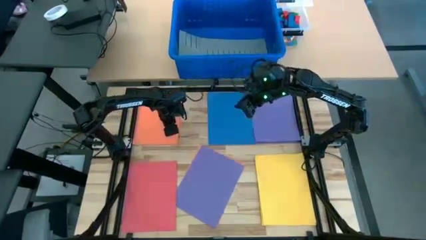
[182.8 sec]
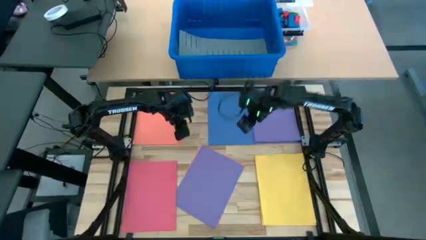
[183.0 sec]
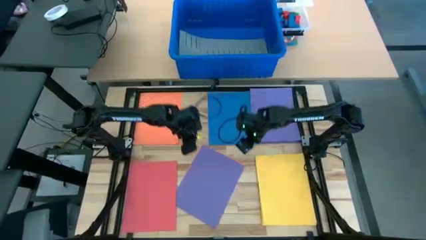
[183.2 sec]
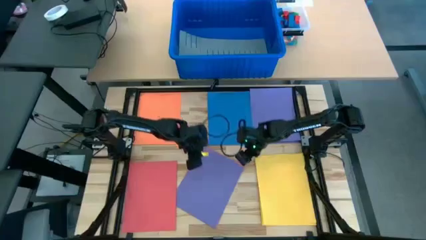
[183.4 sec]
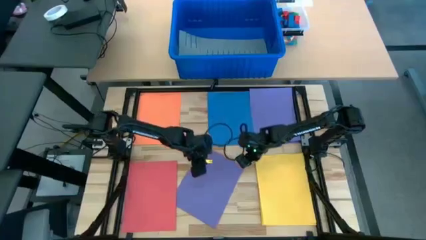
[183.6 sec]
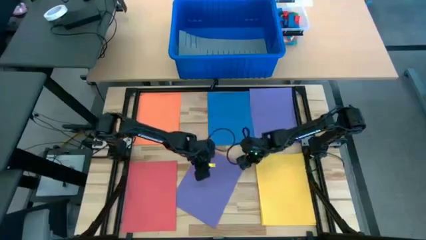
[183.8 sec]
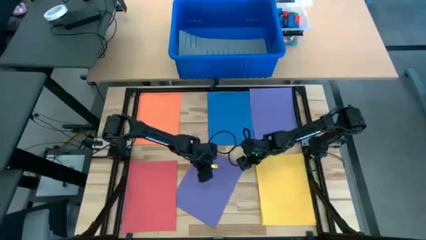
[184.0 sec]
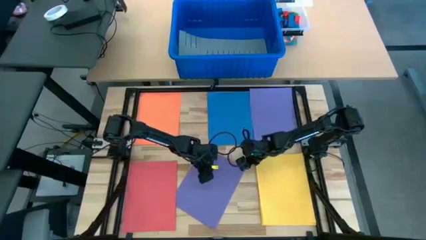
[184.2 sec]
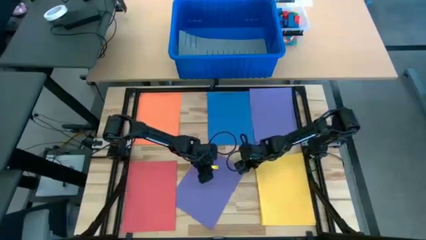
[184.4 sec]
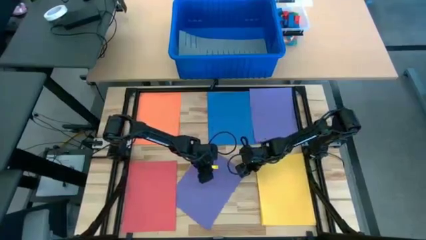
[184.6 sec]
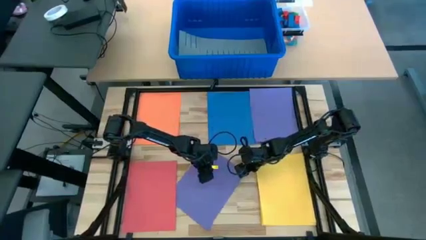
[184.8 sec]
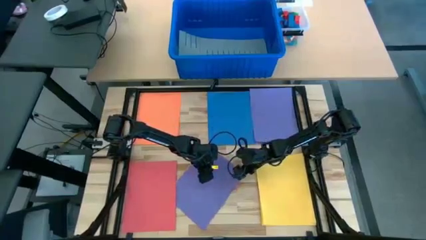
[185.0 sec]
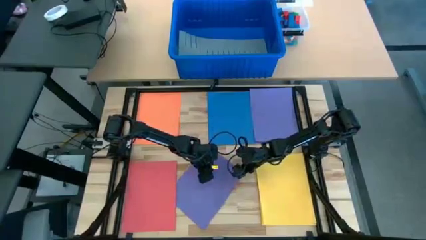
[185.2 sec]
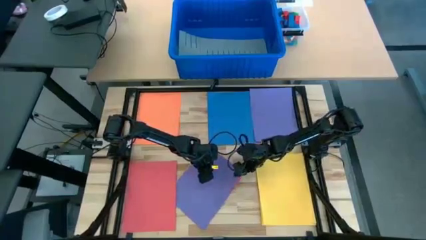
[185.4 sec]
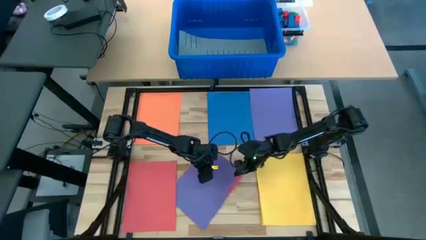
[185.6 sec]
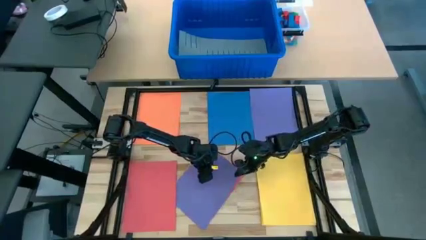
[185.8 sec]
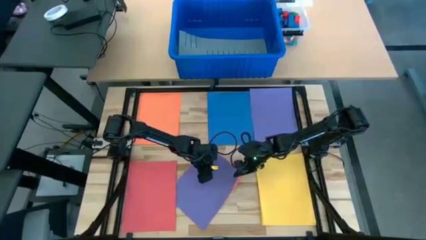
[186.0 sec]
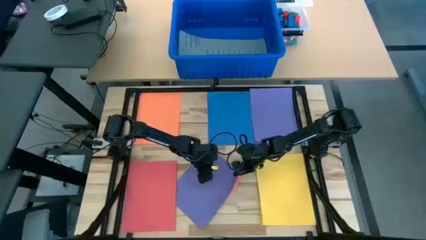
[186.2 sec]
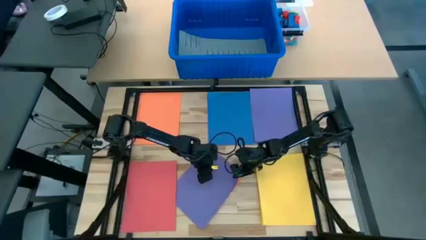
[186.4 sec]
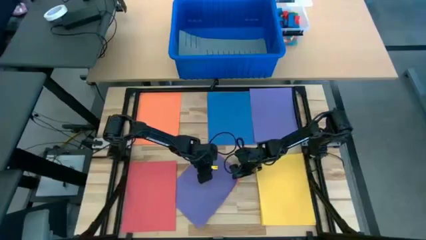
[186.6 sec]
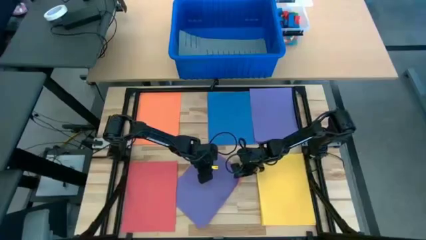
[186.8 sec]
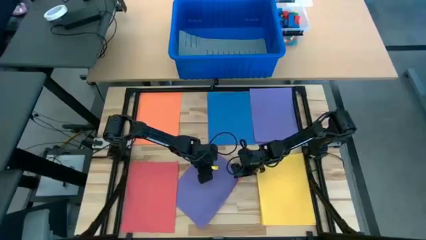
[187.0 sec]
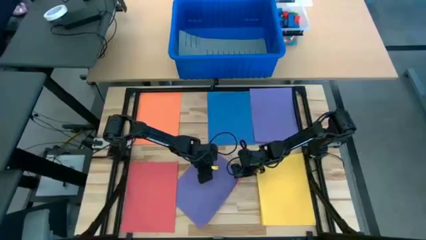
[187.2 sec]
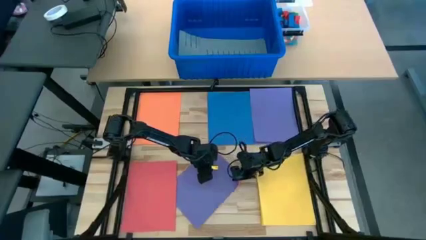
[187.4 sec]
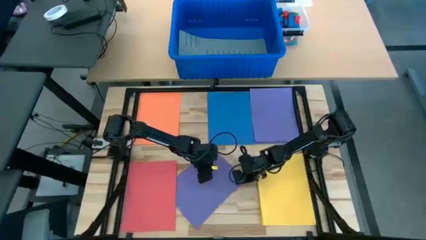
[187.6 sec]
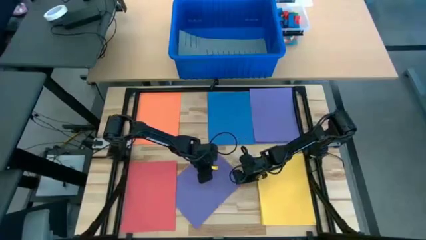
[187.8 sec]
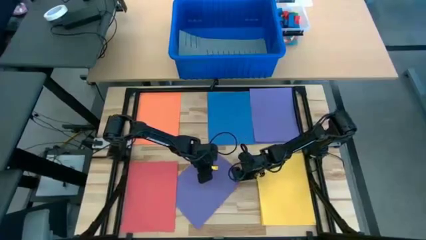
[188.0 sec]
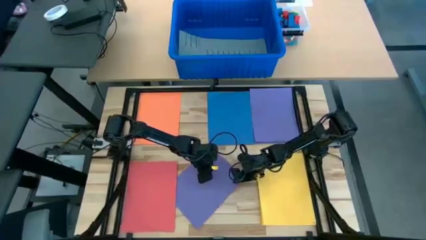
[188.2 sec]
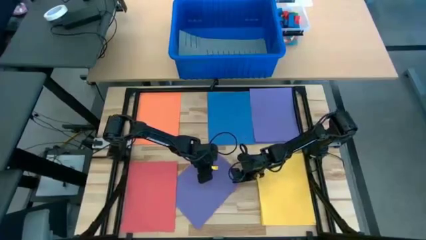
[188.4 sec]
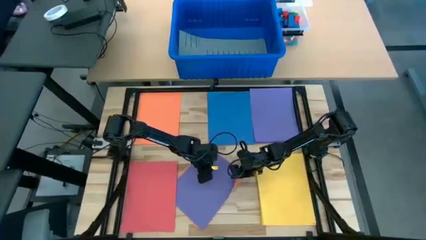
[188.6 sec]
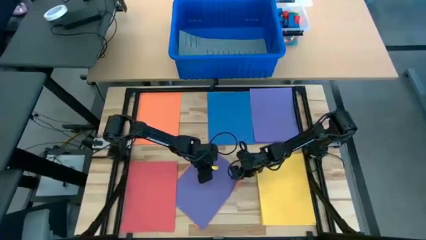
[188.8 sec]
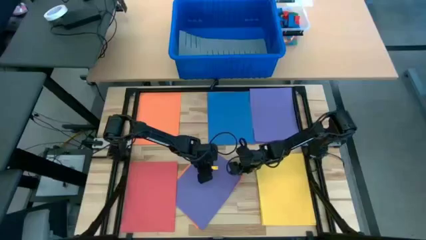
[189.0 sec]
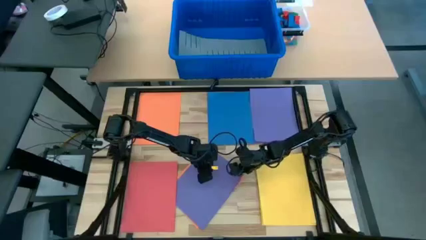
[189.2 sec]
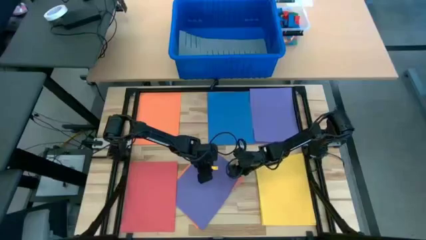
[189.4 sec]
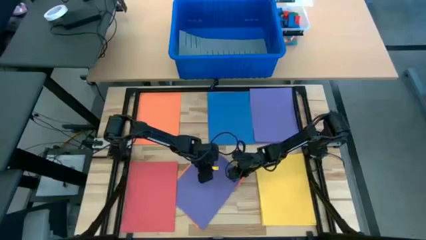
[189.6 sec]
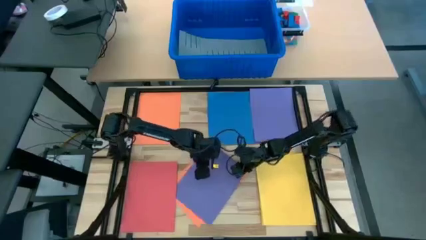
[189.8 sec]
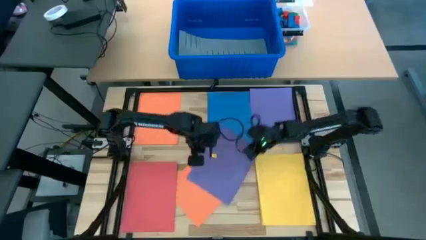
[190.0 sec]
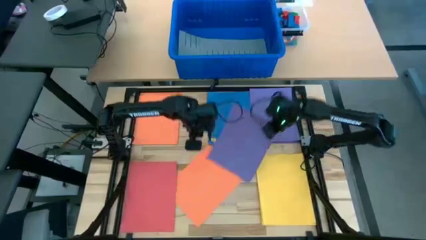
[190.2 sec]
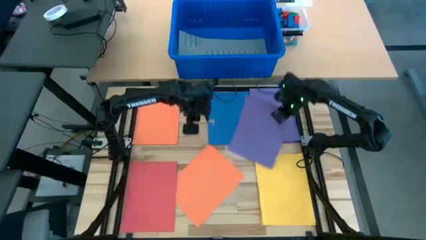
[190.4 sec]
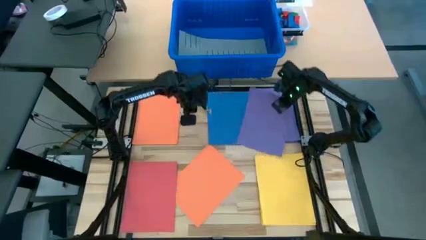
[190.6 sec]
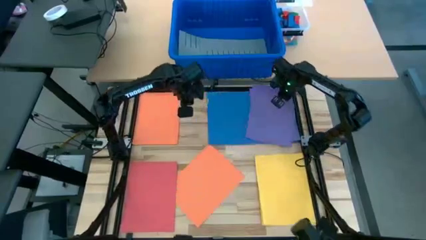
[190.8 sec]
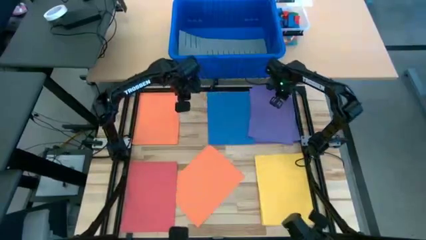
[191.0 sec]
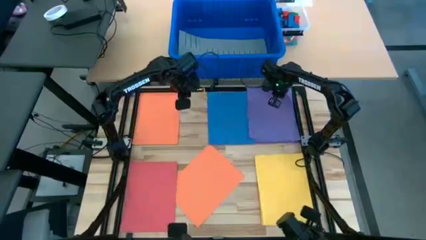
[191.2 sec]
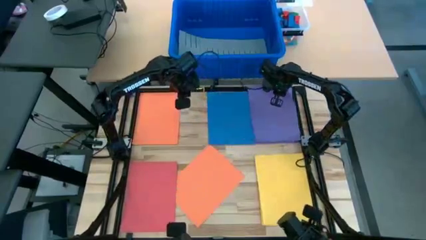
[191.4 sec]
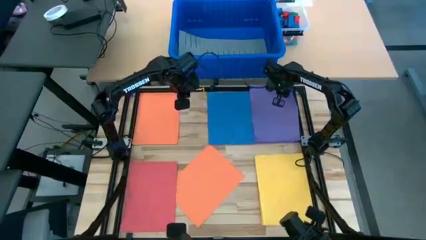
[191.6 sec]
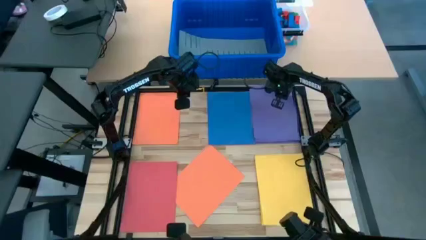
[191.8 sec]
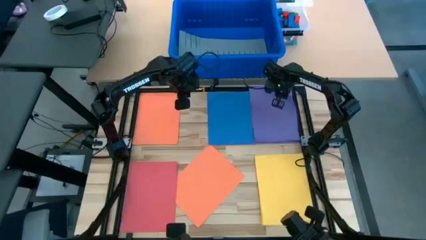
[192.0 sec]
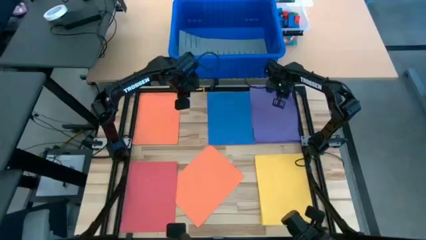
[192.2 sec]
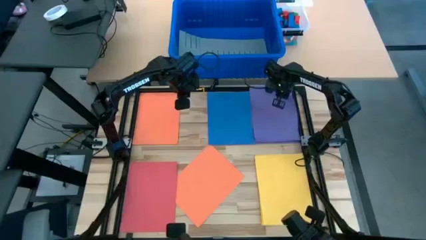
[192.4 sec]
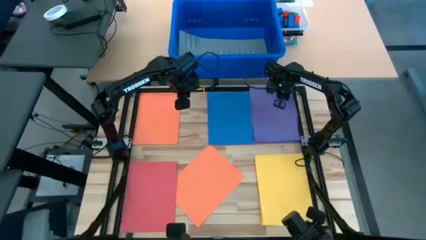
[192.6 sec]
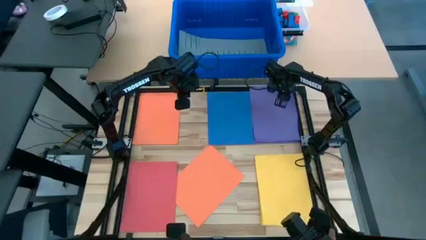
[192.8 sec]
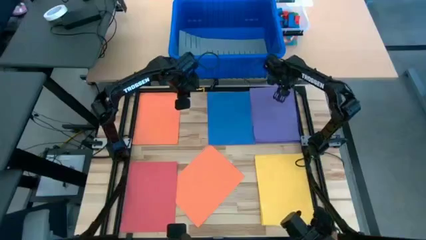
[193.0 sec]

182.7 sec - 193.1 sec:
Task: Organize paper
Stack the purple paper on top of the other purple papers
